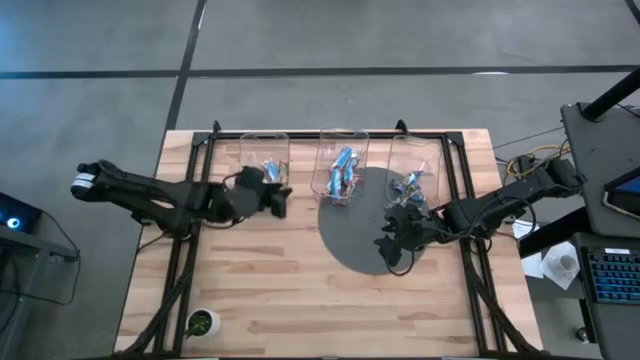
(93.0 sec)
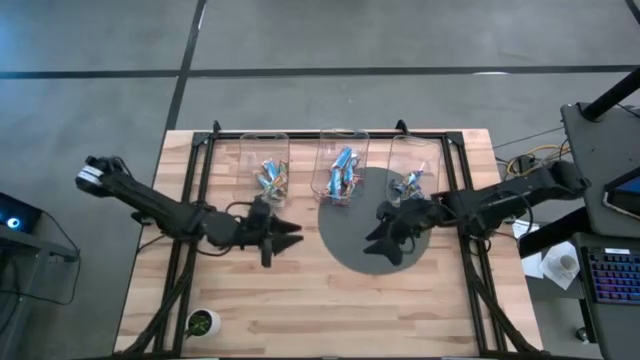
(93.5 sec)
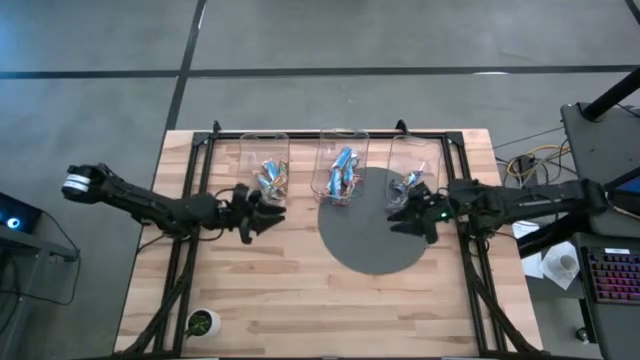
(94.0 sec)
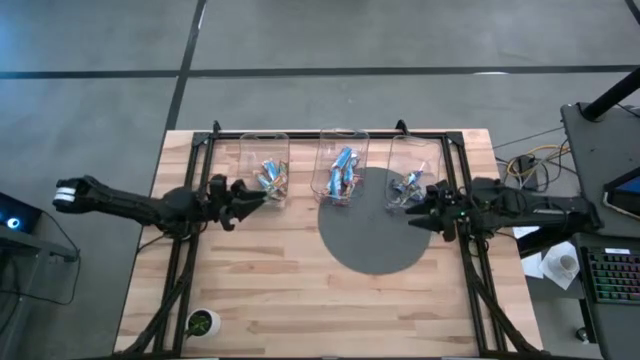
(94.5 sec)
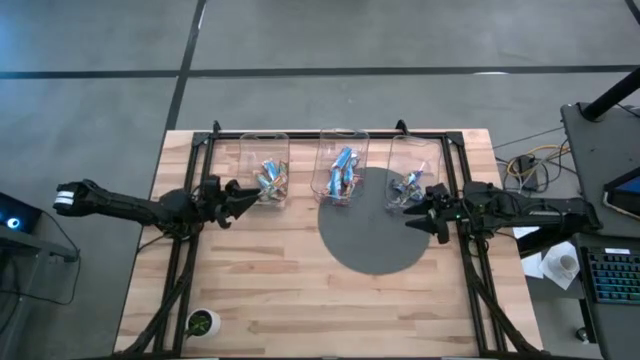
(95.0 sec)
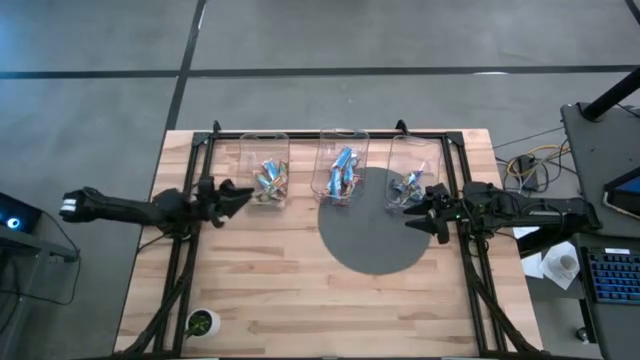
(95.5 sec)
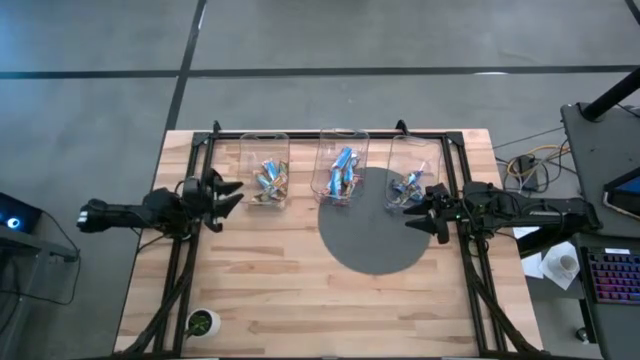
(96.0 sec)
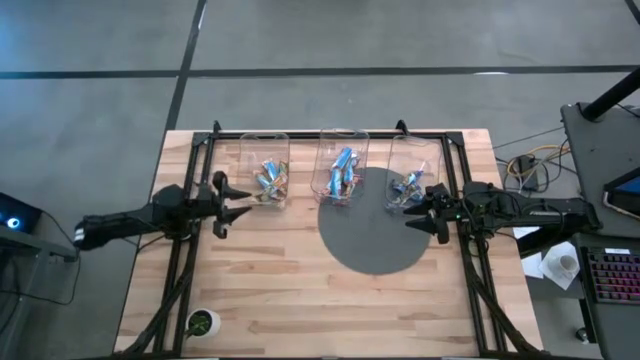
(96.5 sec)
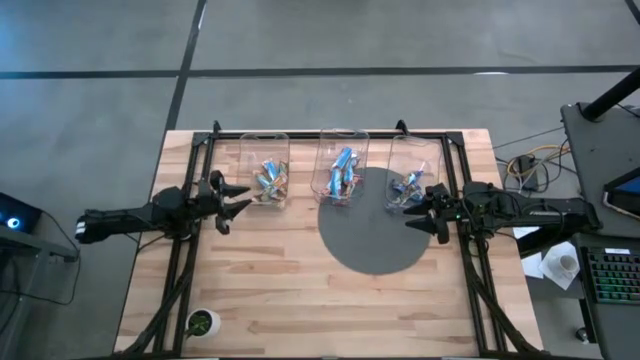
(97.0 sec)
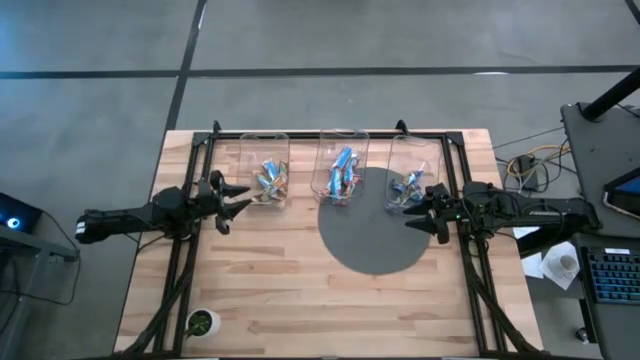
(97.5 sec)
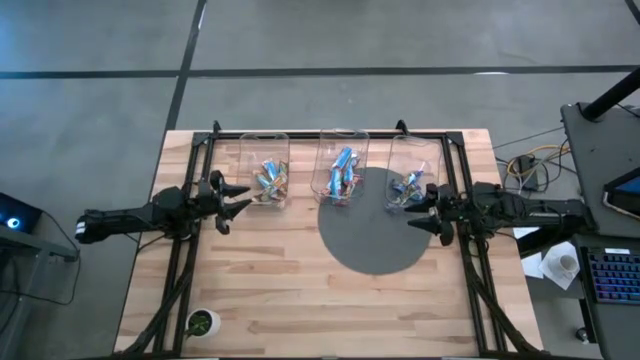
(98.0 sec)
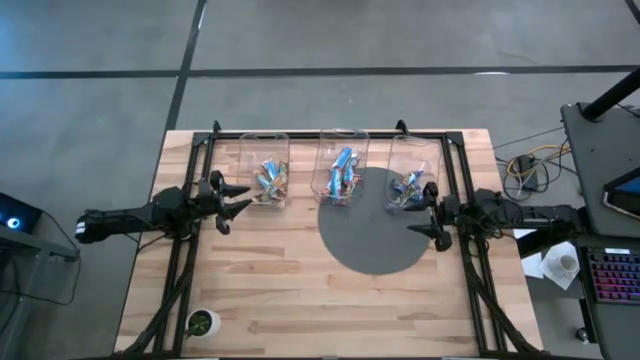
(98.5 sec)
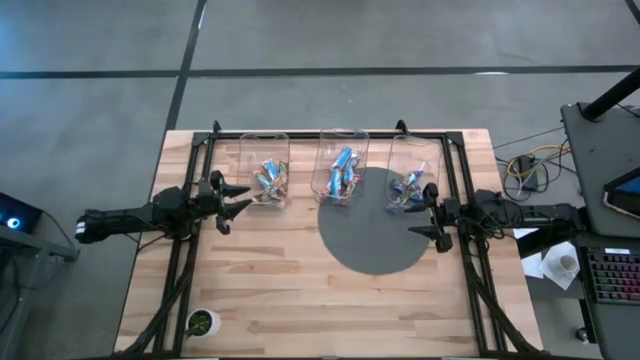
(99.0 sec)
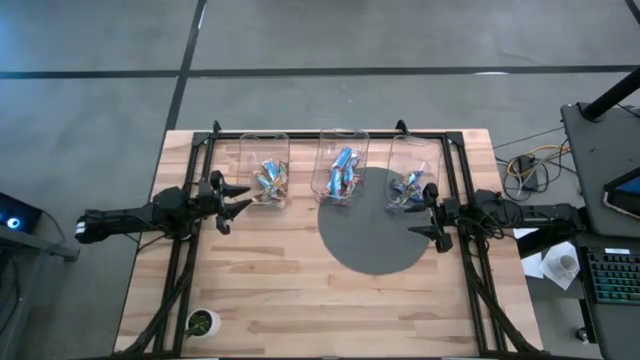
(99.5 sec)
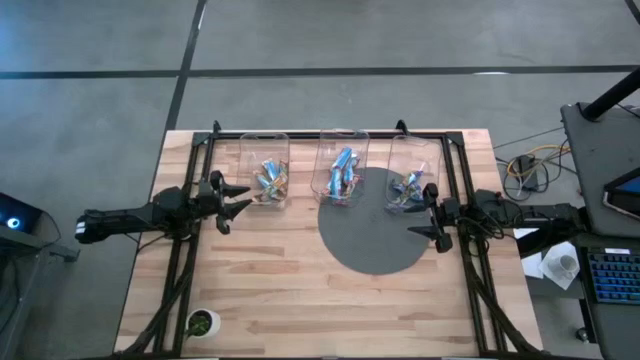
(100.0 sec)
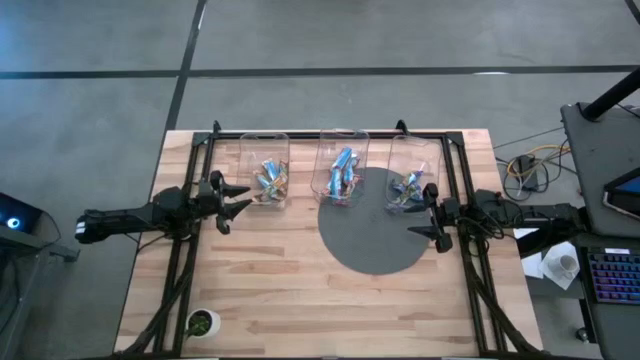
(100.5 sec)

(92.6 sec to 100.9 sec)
Task: Pick and place Granola Bars by type
Return to Home Position

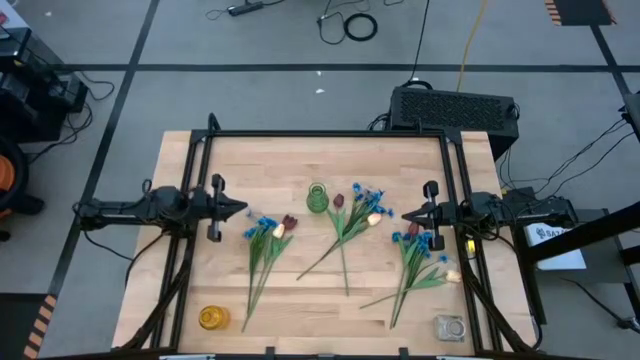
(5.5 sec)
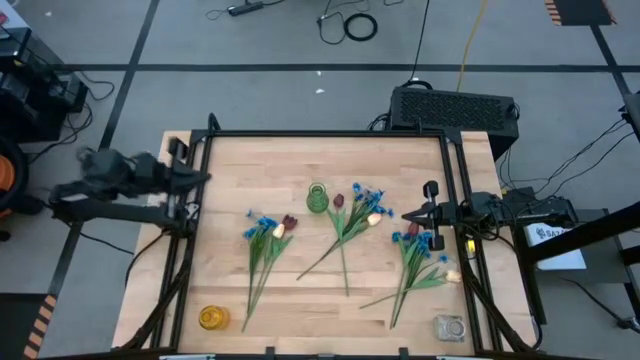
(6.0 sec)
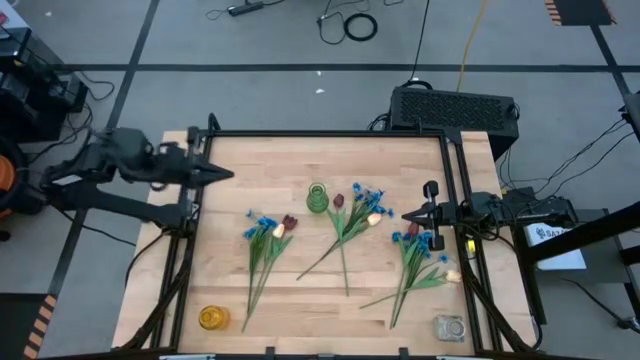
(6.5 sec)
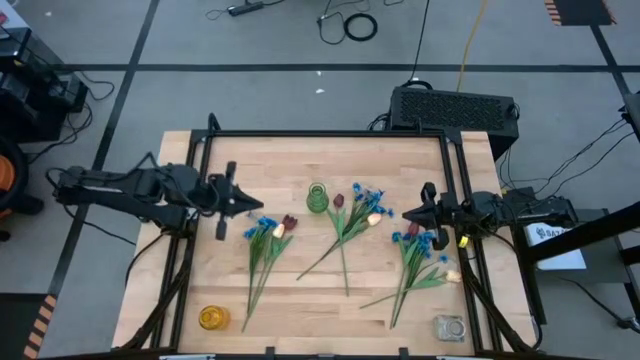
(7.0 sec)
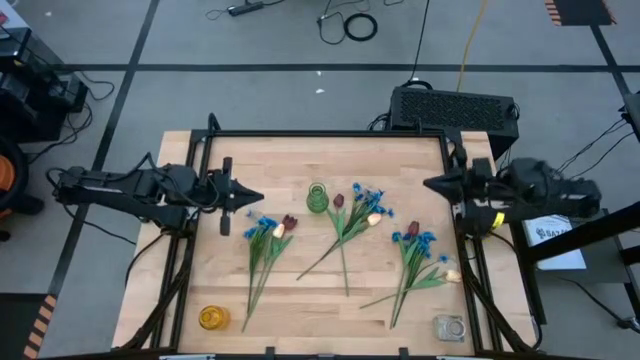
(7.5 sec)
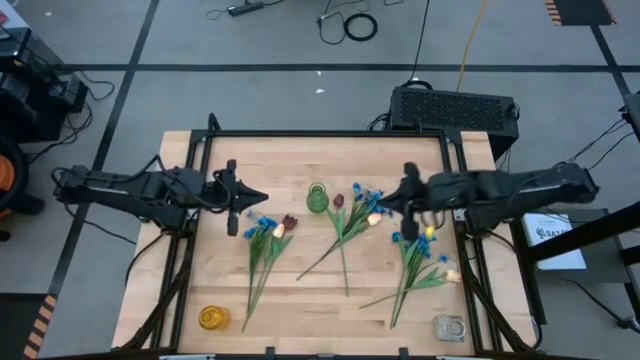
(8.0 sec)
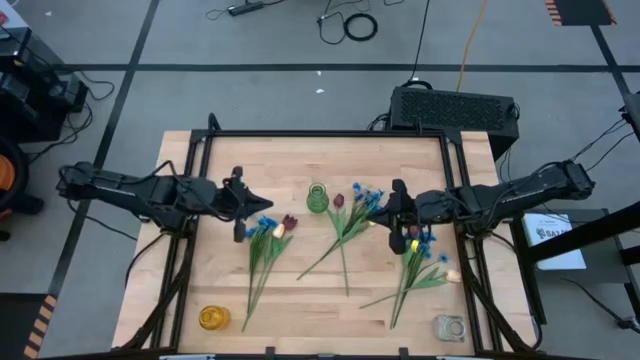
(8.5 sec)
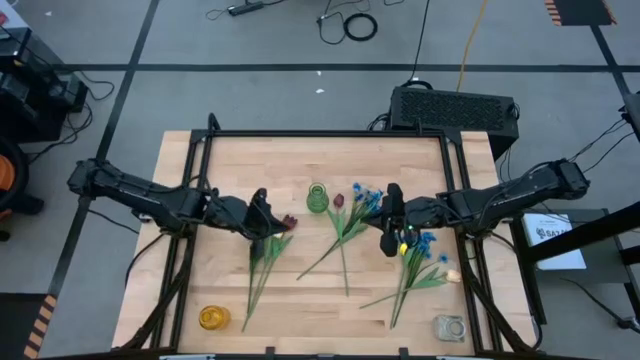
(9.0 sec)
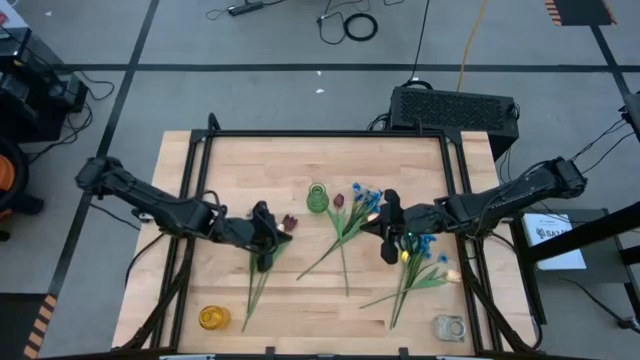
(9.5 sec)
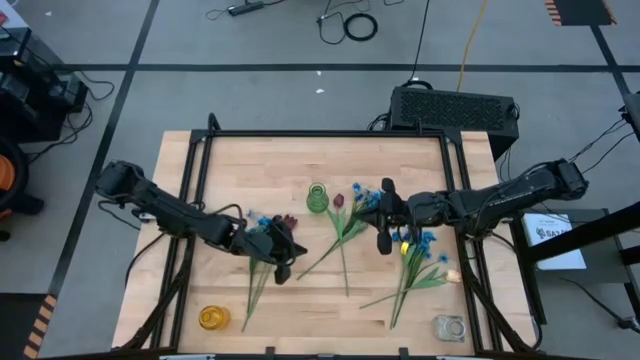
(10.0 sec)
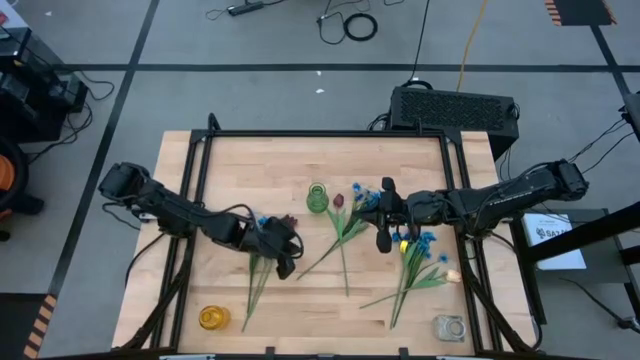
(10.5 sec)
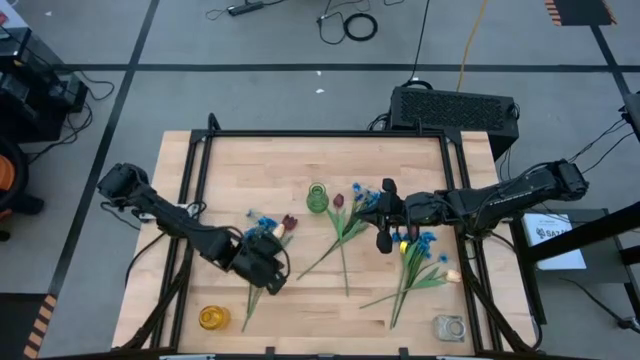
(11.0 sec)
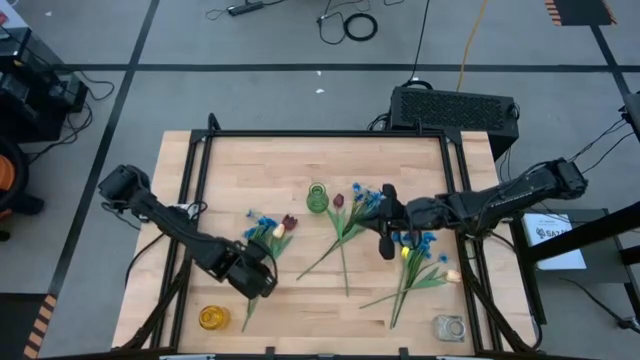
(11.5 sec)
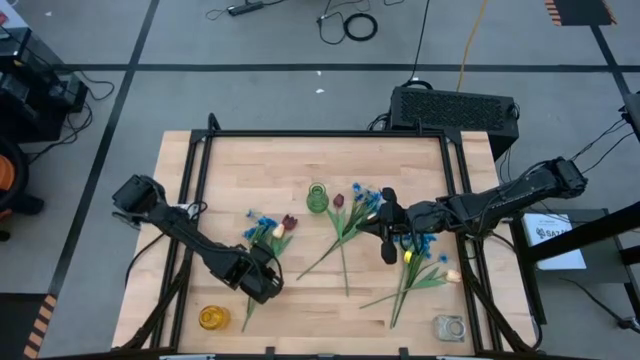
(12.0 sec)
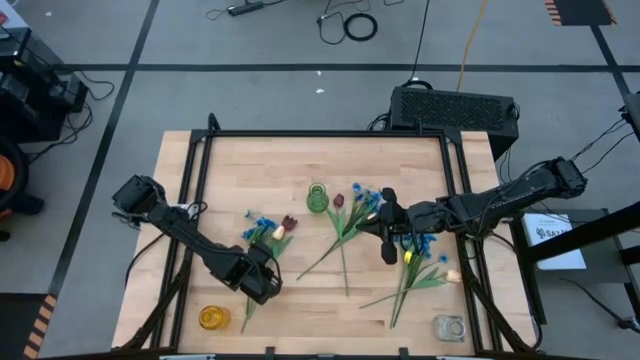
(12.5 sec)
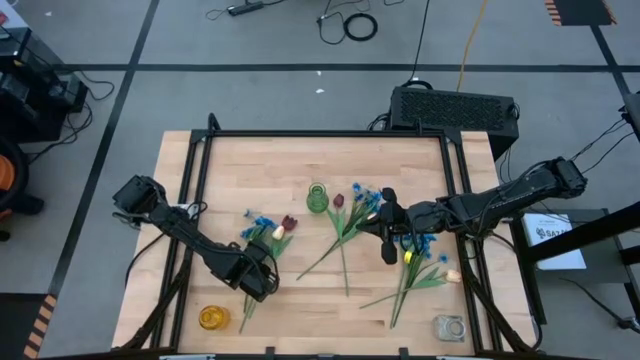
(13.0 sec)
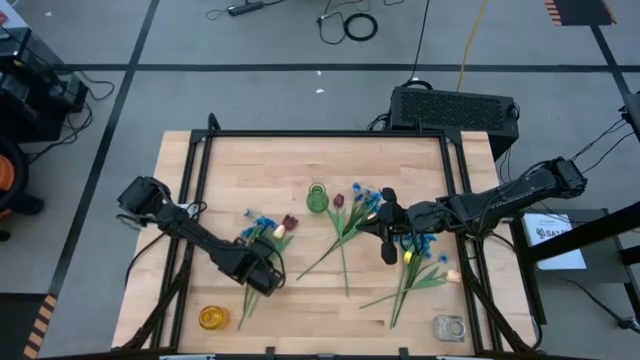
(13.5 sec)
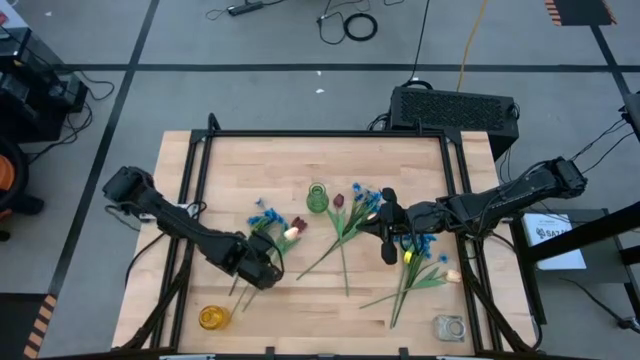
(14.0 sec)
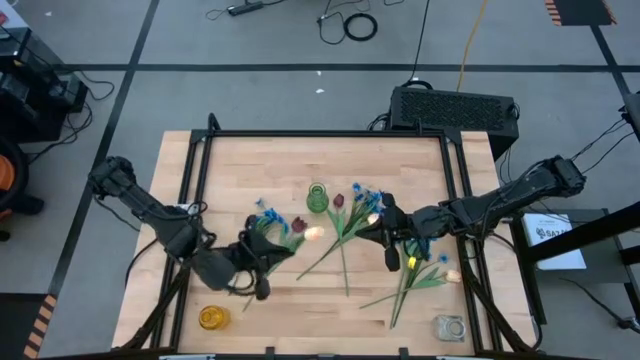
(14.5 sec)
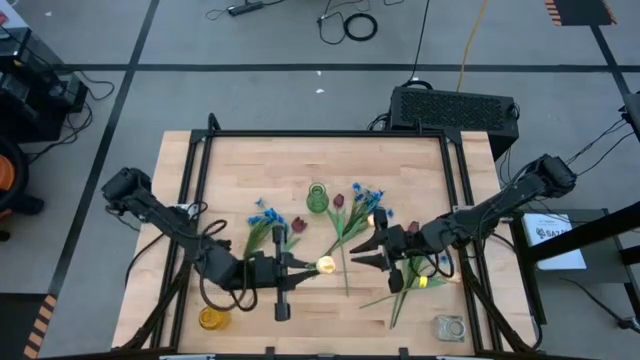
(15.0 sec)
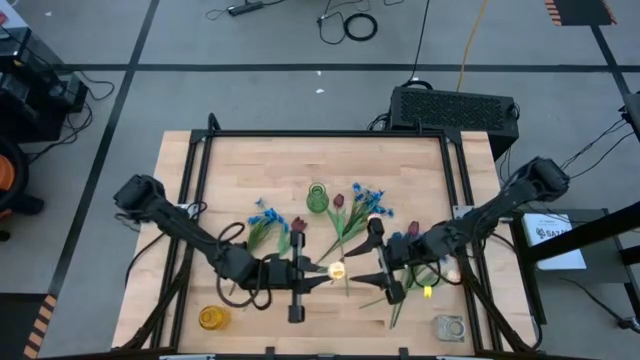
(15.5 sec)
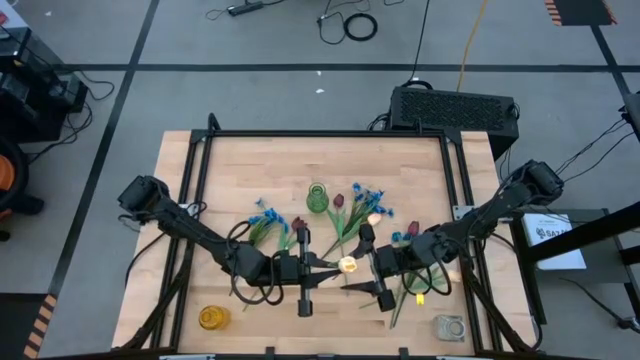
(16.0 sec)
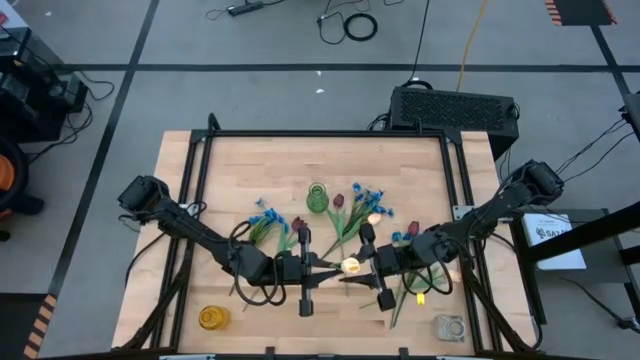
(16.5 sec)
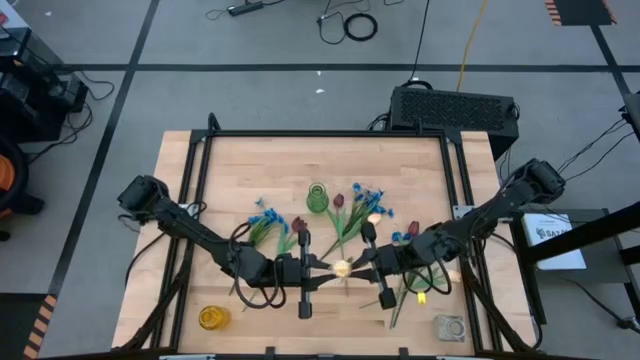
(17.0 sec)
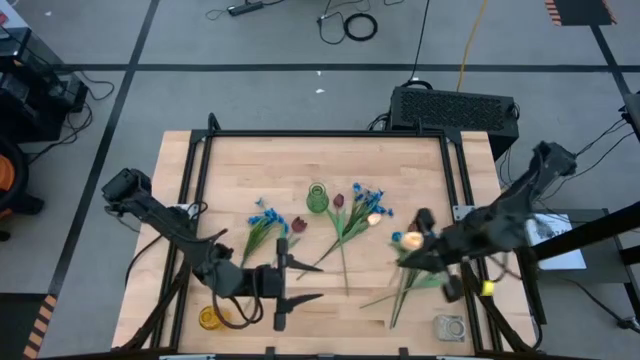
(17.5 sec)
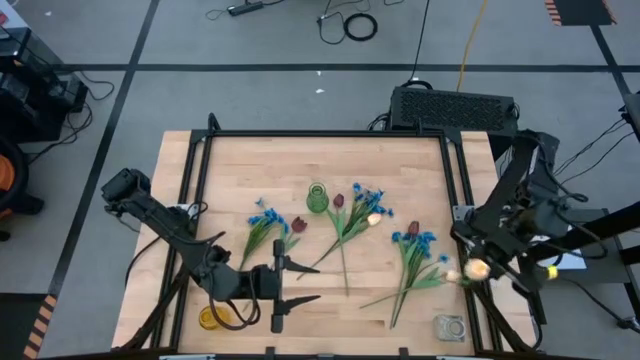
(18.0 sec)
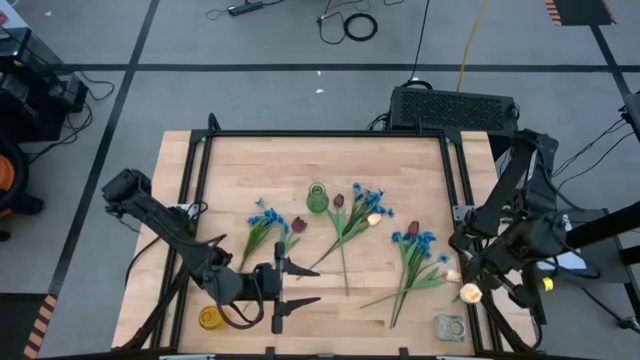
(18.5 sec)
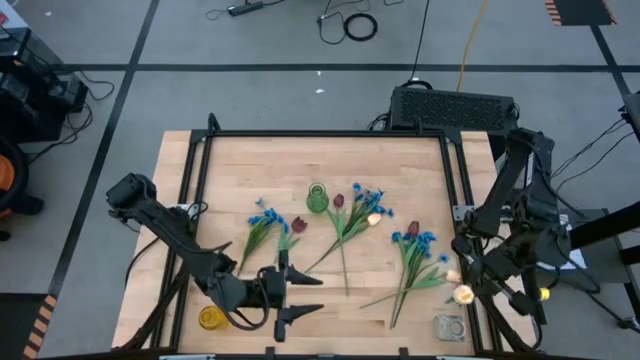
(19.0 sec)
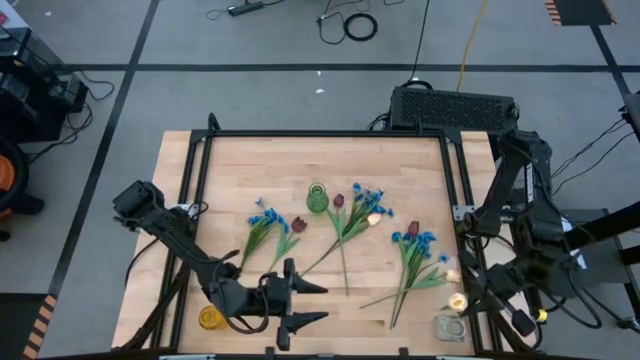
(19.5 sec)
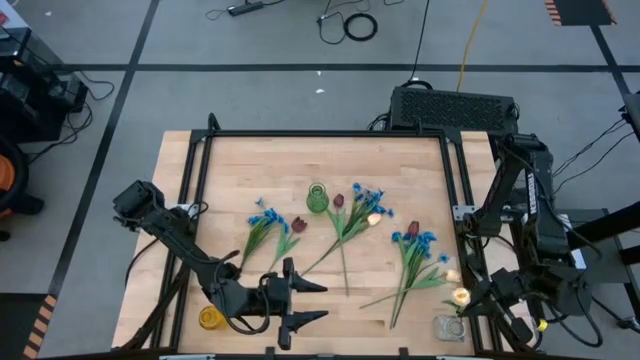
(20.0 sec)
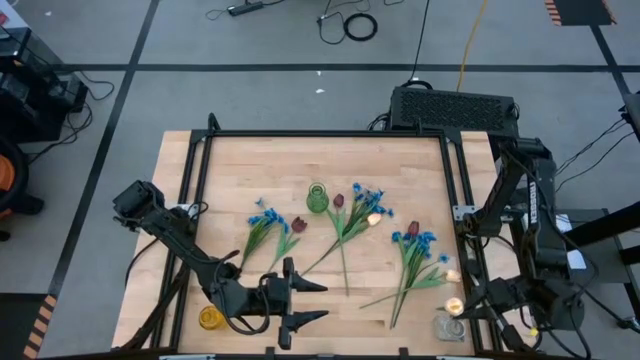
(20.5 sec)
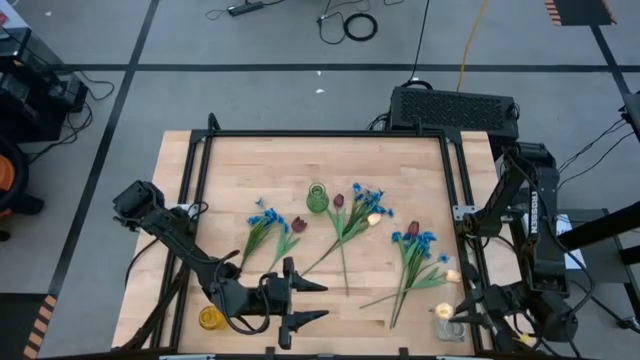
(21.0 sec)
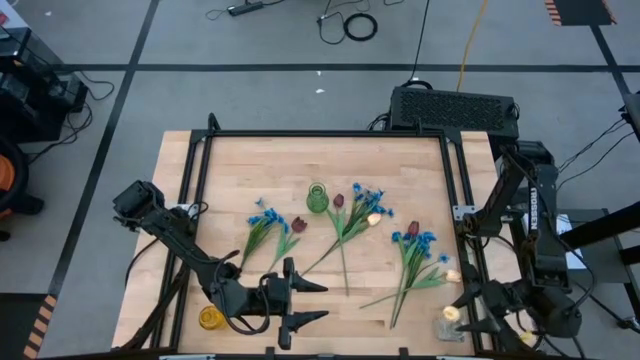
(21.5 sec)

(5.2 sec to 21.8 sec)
Task: Sort flowers into vase by color
Put the middle left yellow flower into the transparent vase
